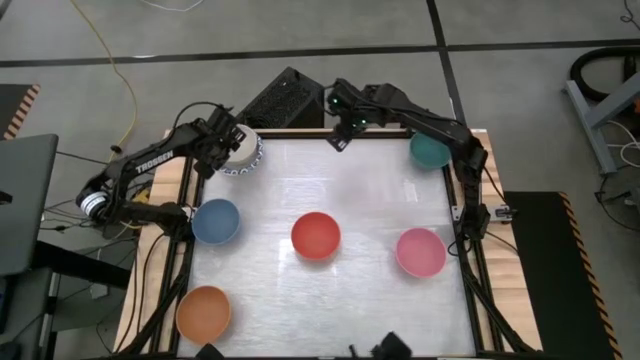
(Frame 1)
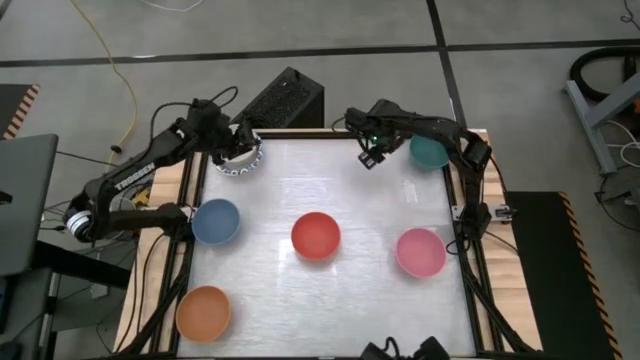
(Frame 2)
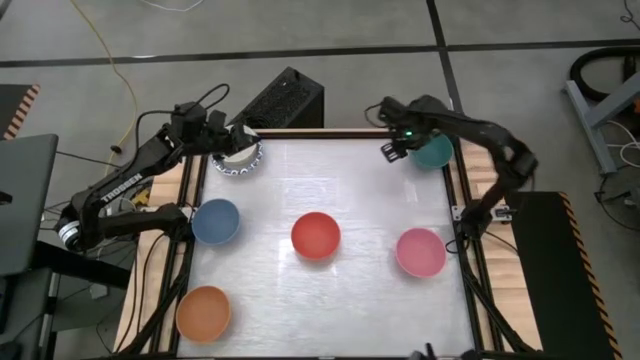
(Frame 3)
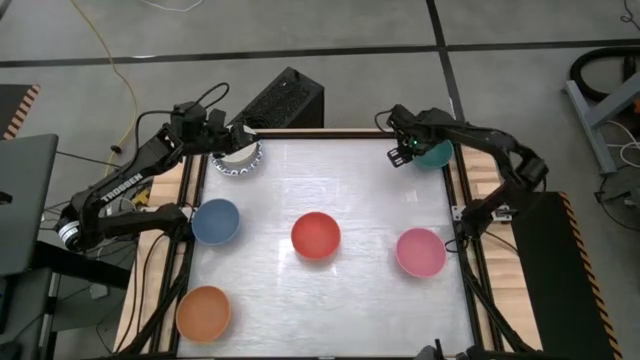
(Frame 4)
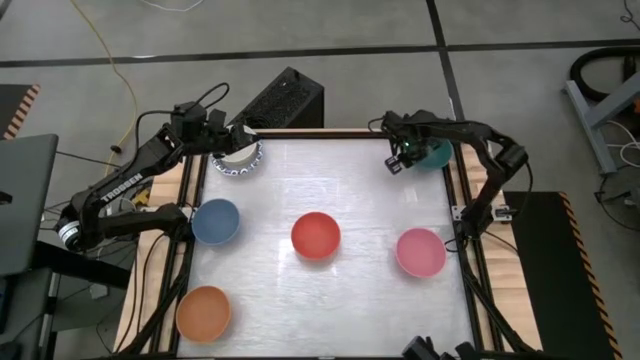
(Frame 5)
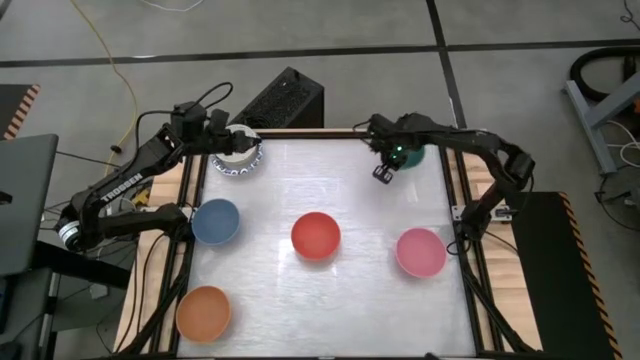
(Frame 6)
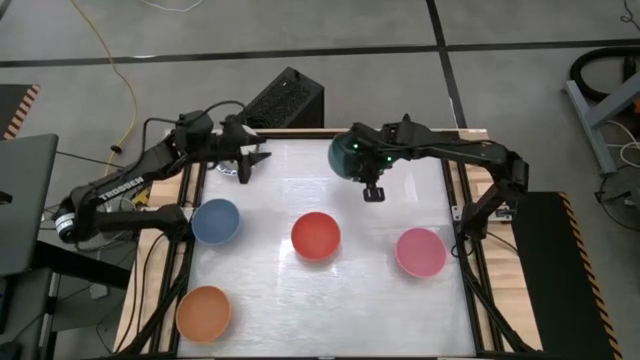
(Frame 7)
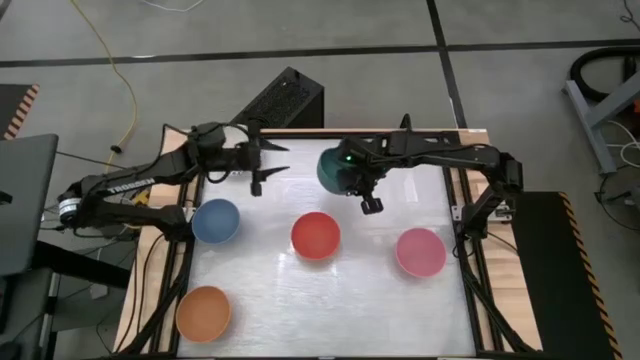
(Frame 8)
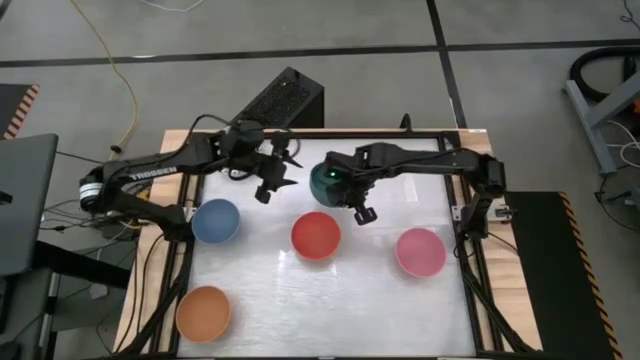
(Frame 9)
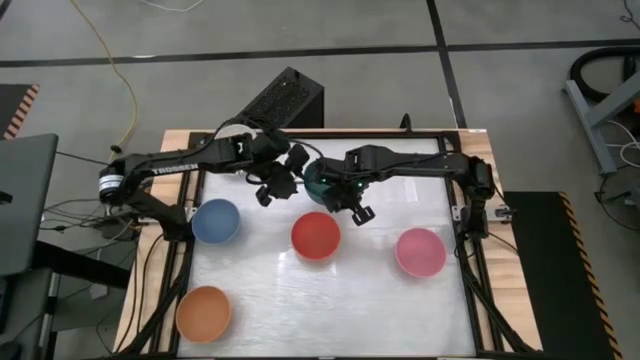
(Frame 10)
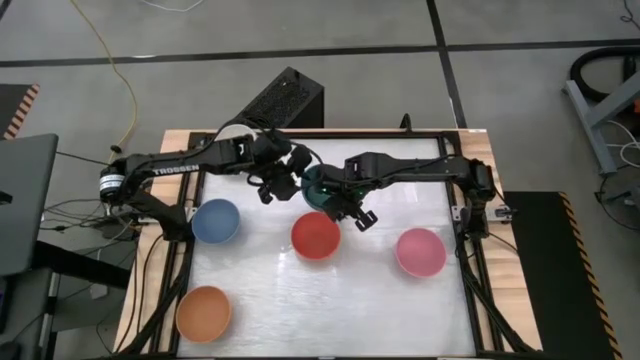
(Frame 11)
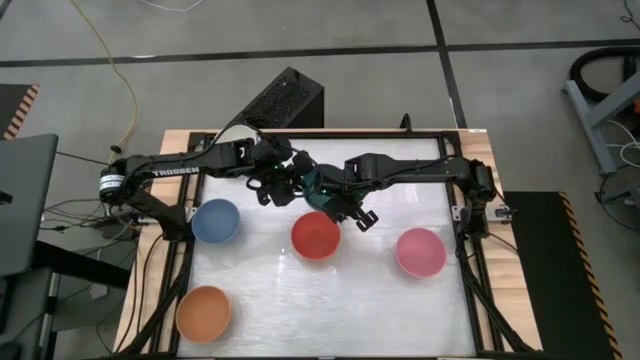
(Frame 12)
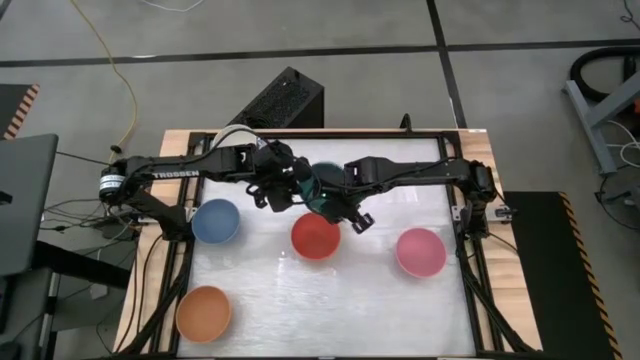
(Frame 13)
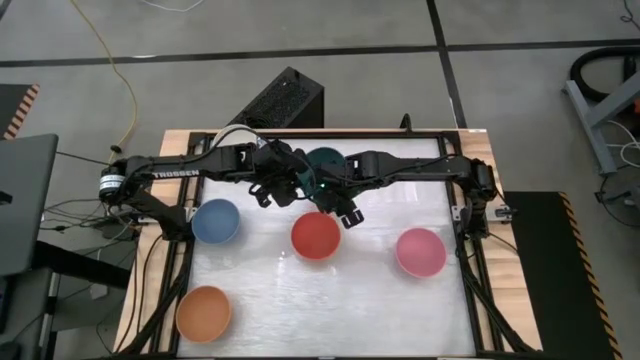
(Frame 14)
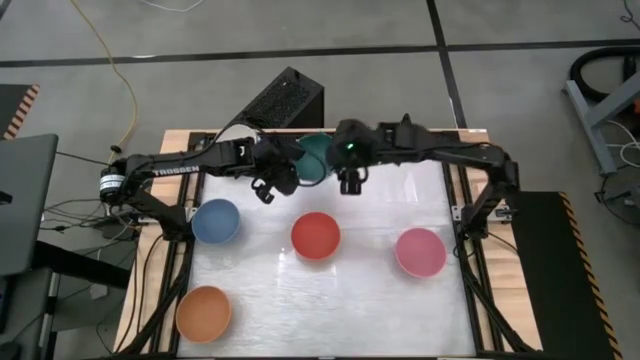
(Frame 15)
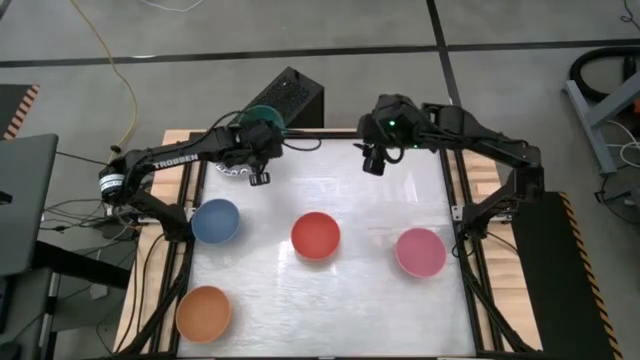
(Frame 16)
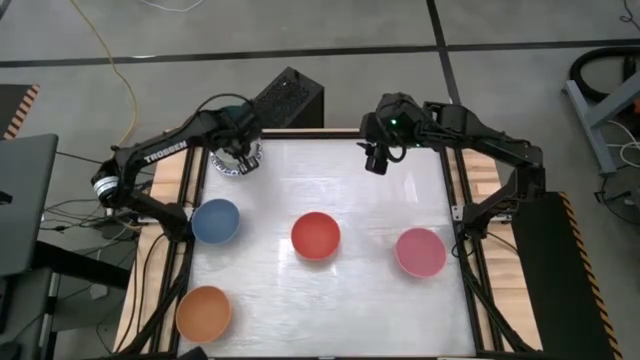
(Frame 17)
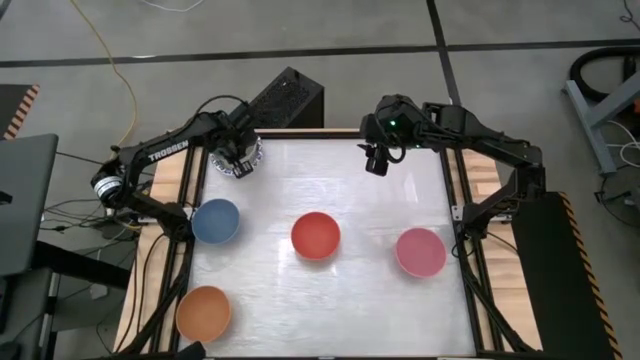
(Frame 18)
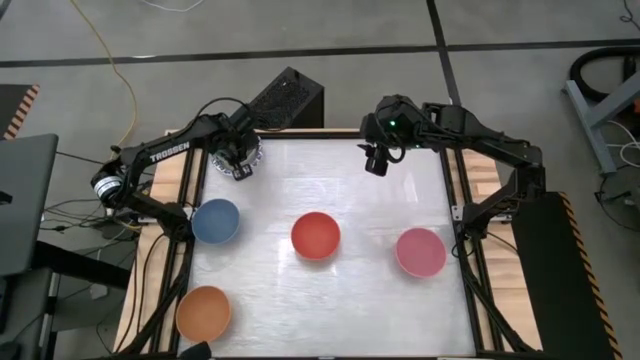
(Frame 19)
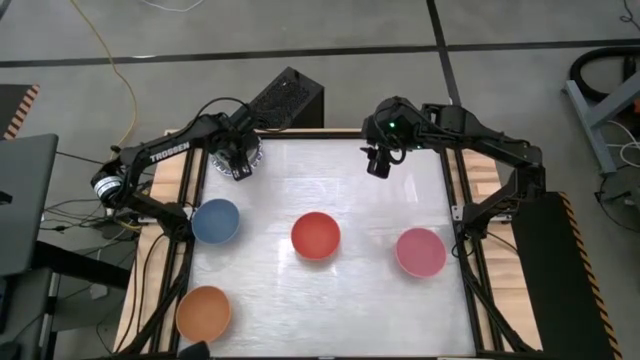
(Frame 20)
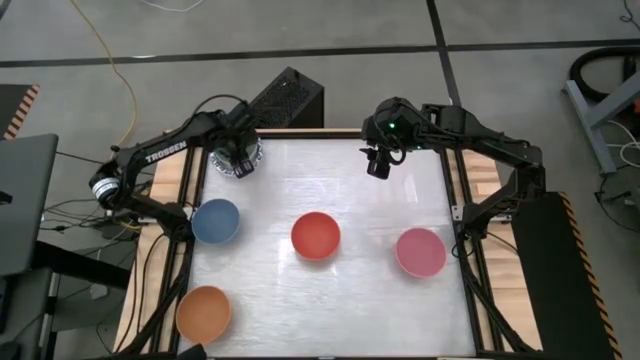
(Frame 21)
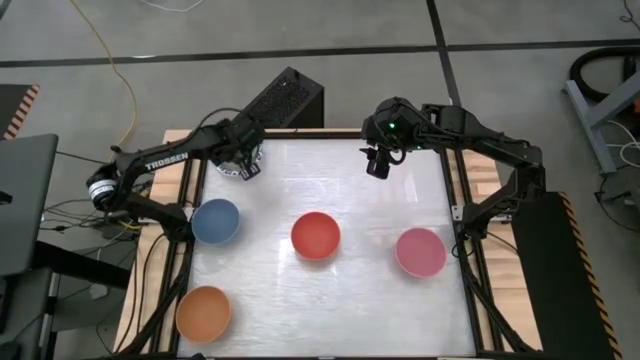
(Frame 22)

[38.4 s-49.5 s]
Stack the green bowl on top of the white bowl

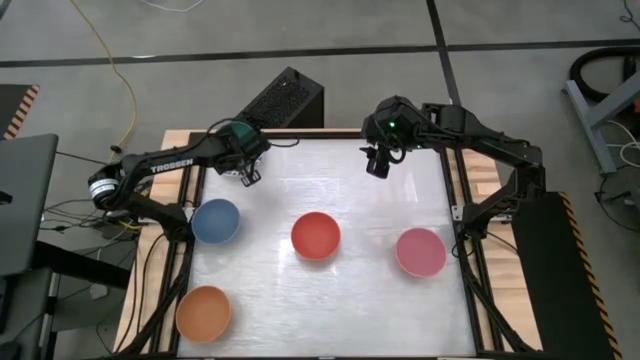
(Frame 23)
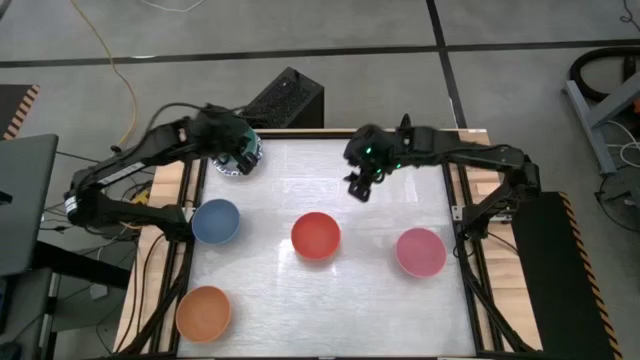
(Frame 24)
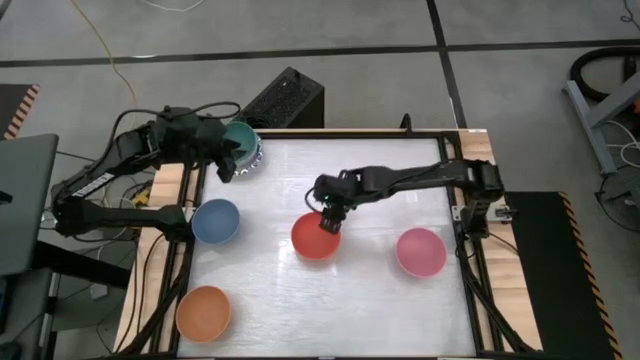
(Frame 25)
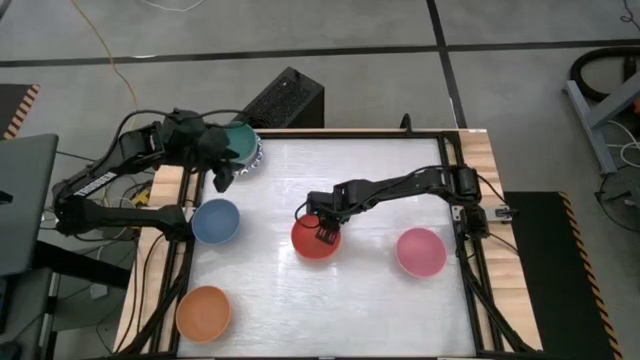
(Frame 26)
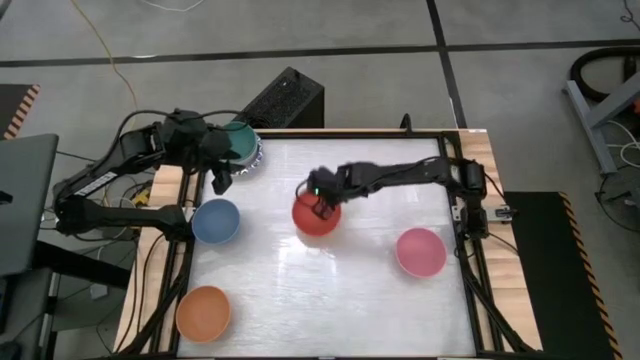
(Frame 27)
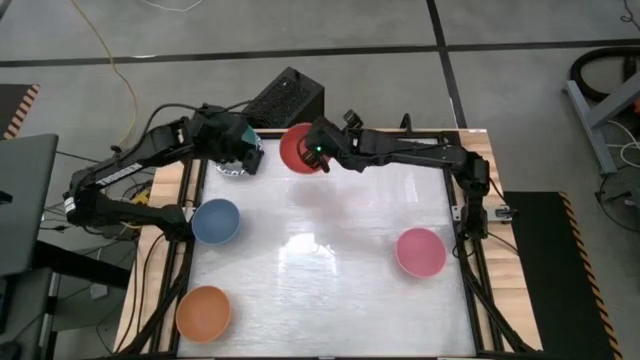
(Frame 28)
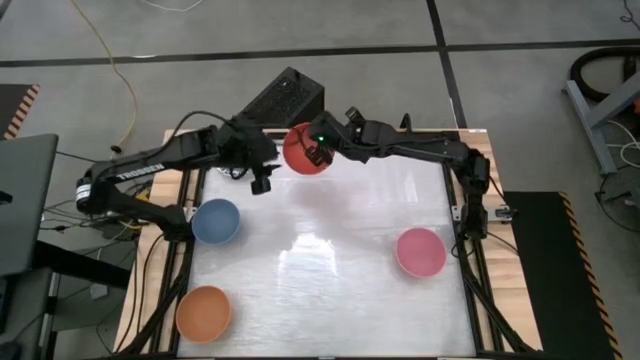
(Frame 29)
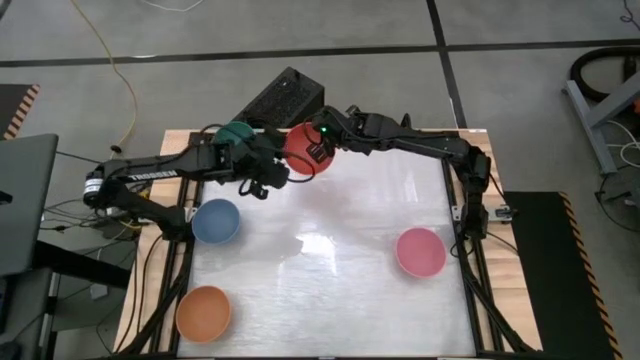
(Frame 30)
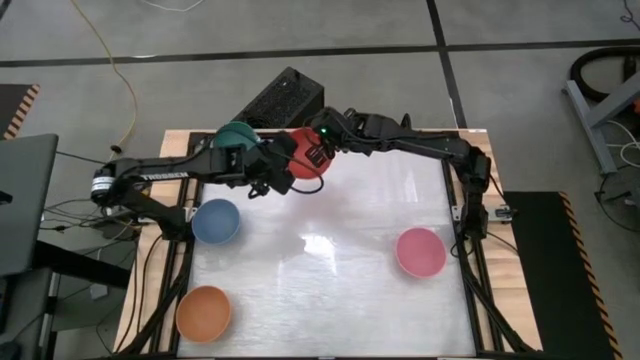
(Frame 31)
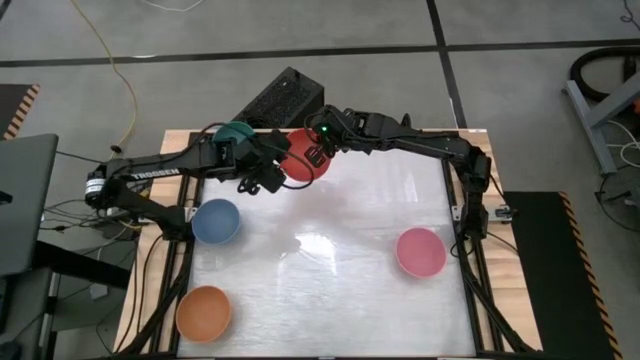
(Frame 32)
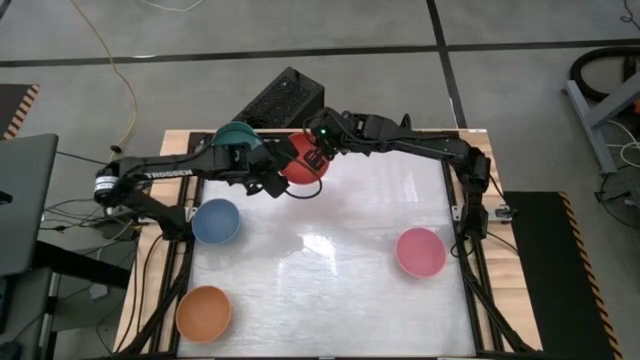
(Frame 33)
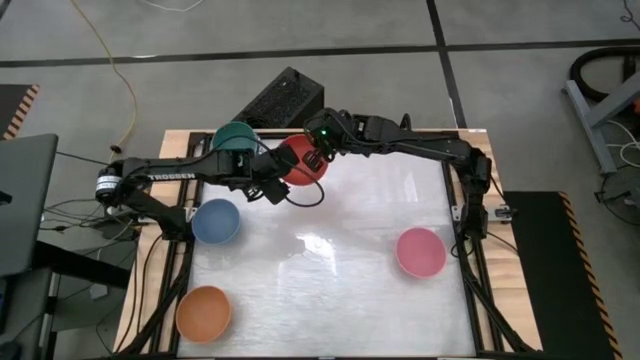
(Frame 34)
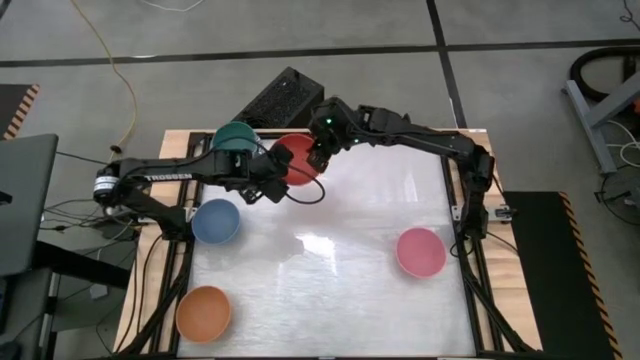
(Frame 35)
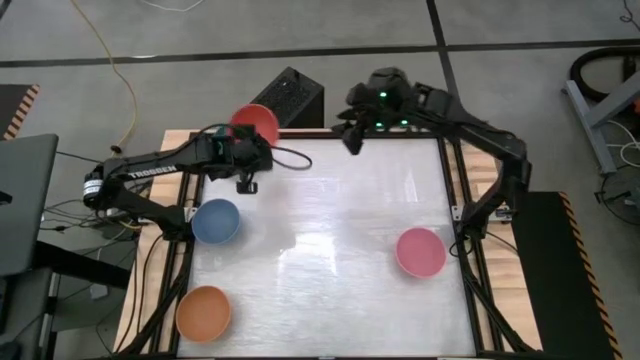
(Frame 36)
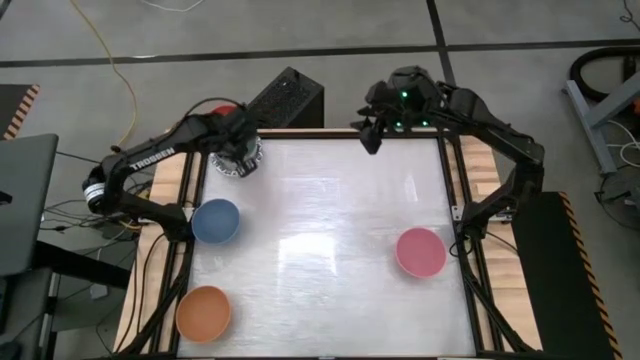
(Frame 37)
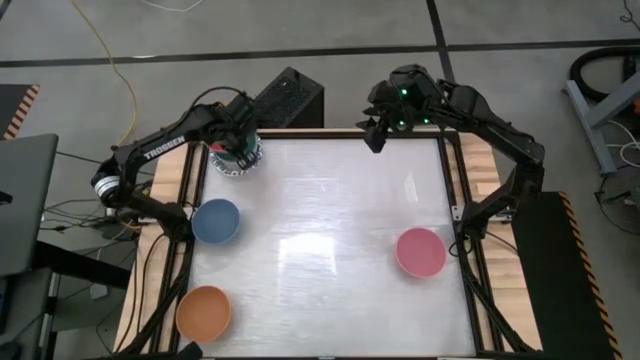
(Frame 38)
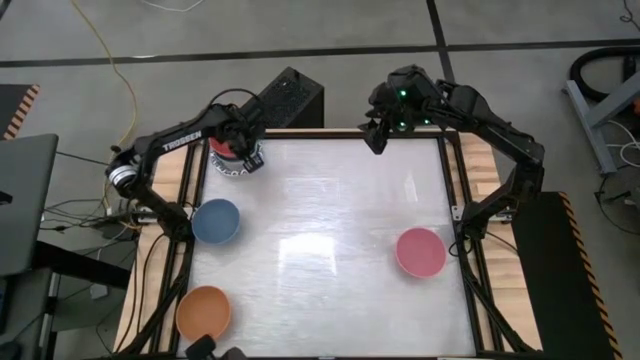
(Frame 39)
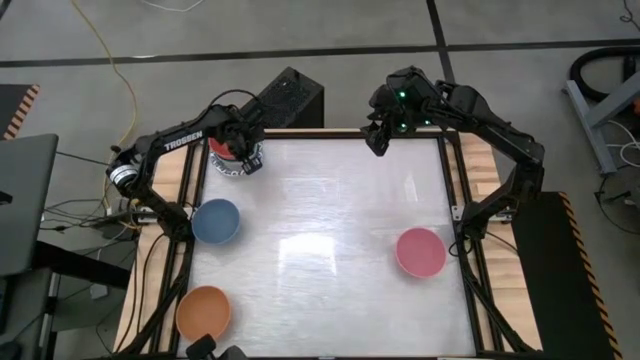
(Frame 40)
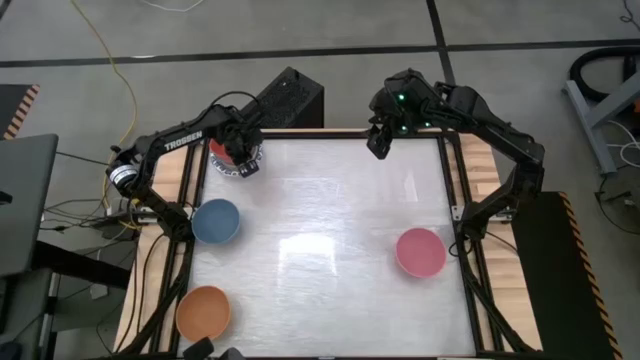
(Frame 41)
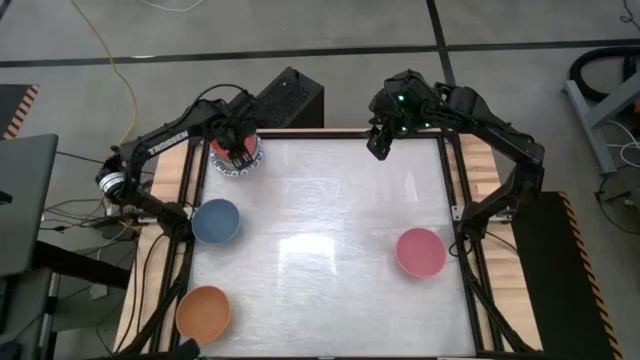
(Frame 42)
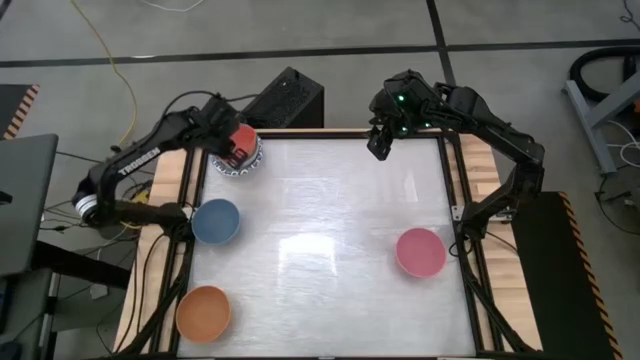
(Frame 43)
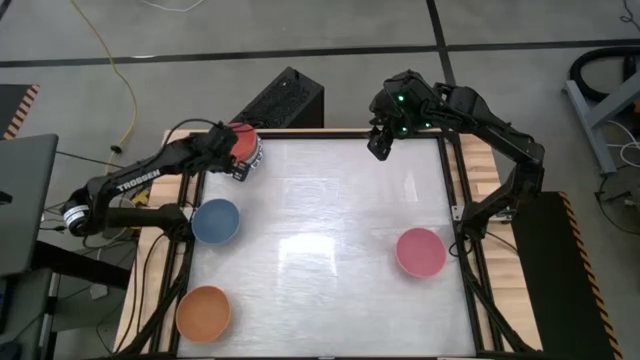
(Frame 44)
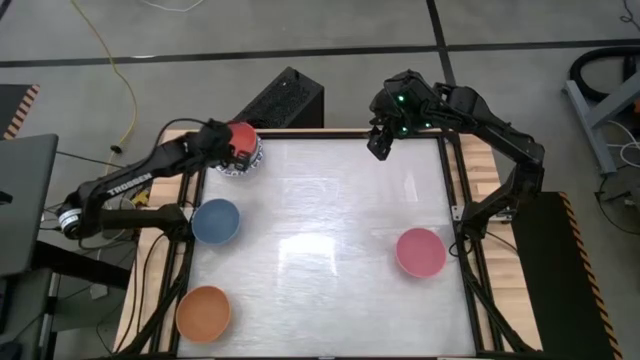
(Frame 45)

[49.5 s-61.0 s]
Stack the orange bowl on top of the green bowl
